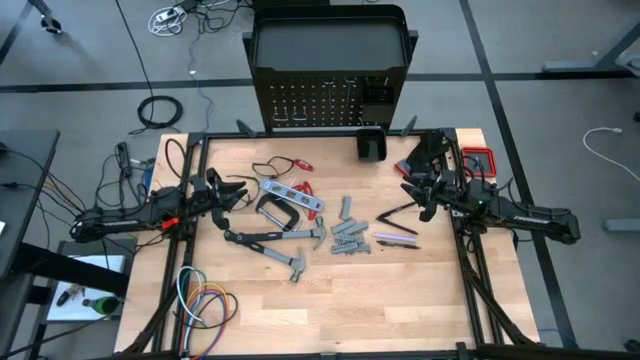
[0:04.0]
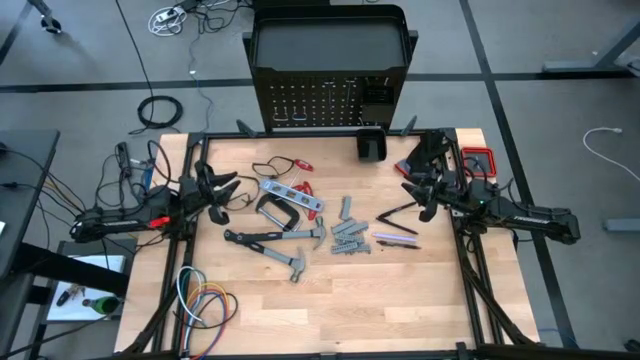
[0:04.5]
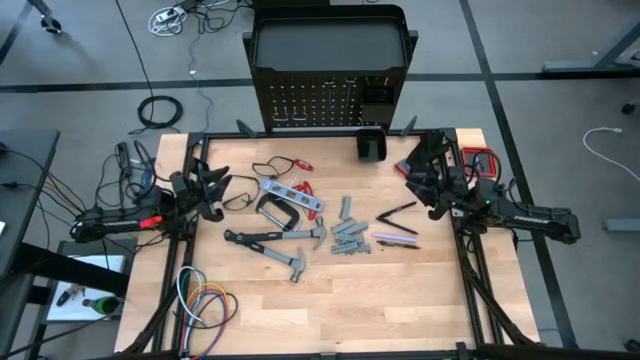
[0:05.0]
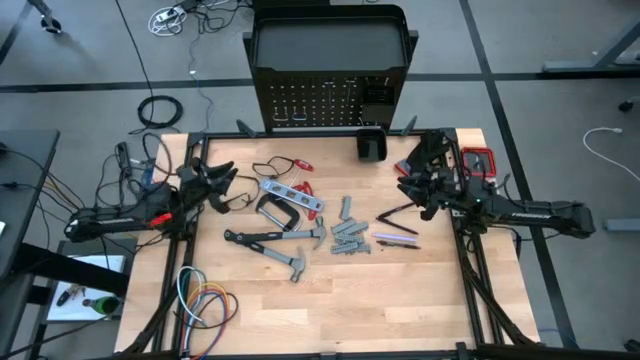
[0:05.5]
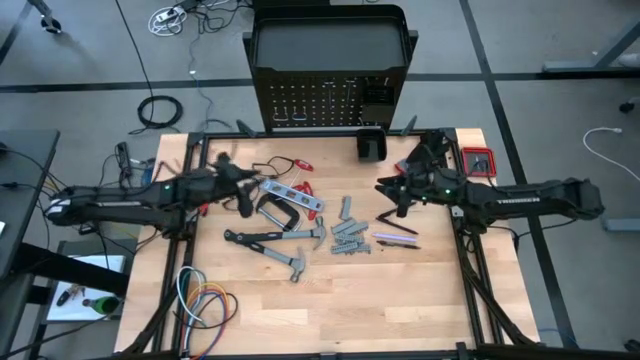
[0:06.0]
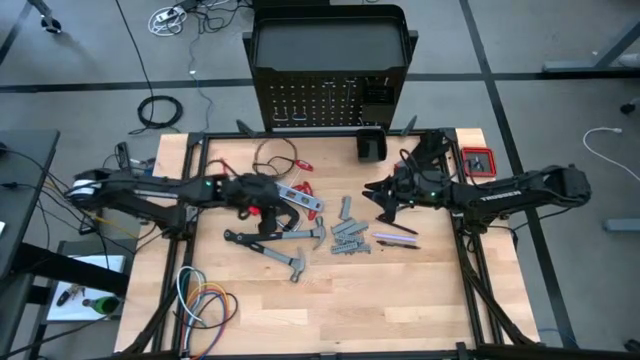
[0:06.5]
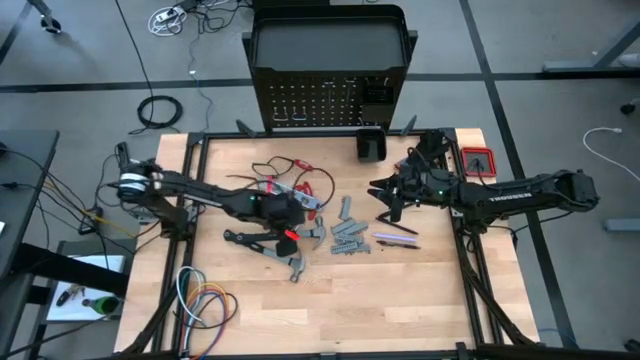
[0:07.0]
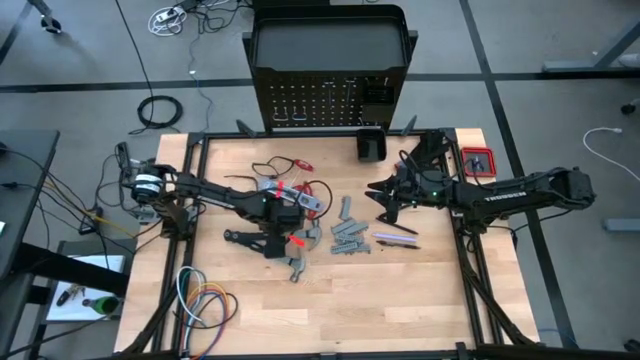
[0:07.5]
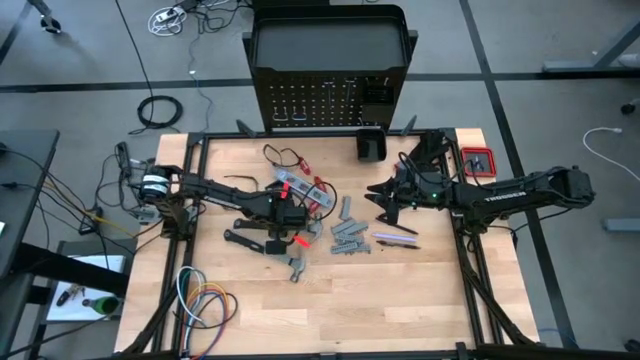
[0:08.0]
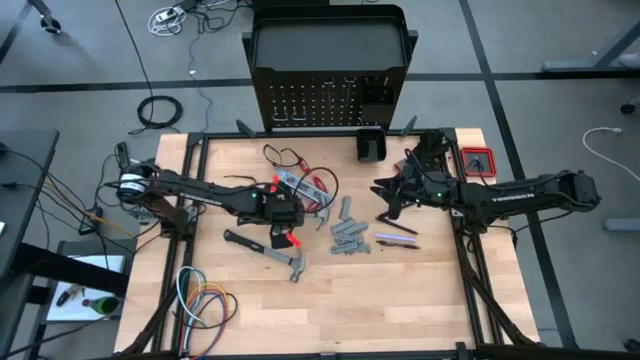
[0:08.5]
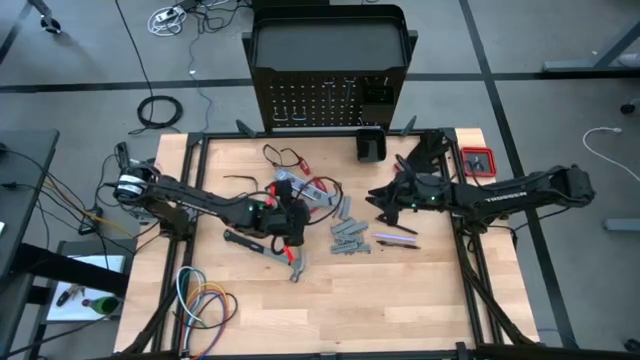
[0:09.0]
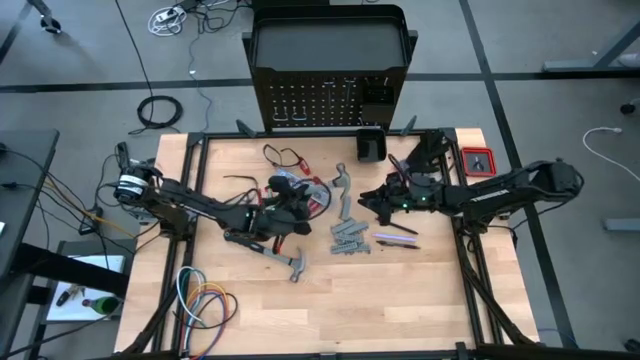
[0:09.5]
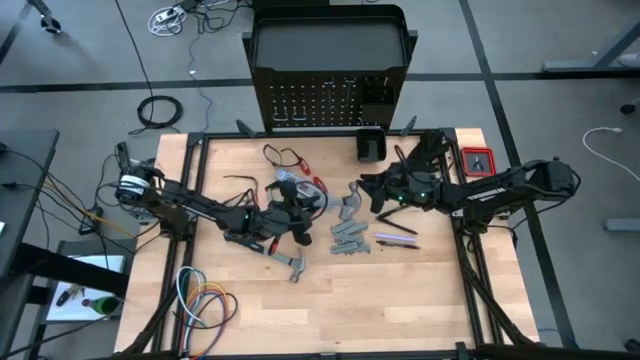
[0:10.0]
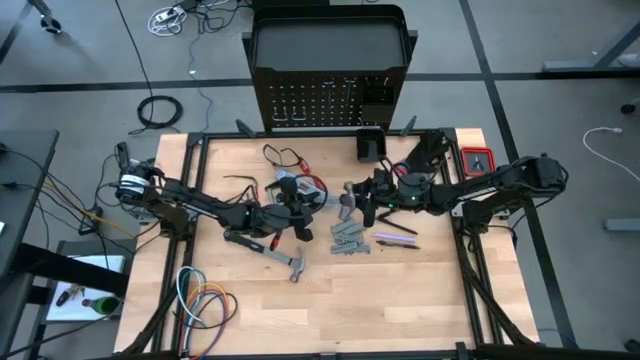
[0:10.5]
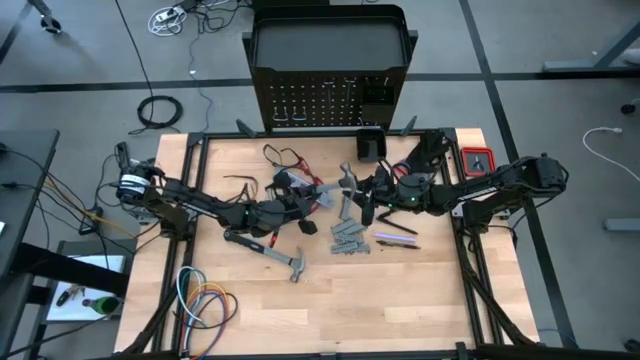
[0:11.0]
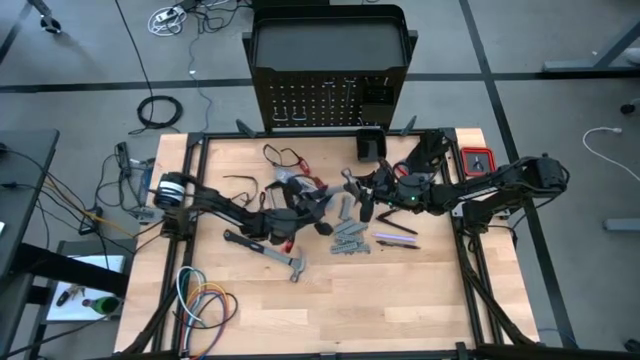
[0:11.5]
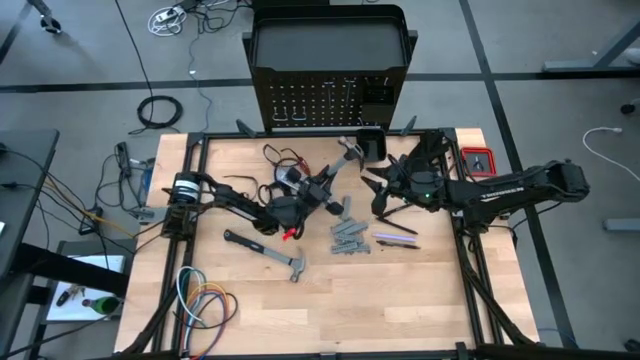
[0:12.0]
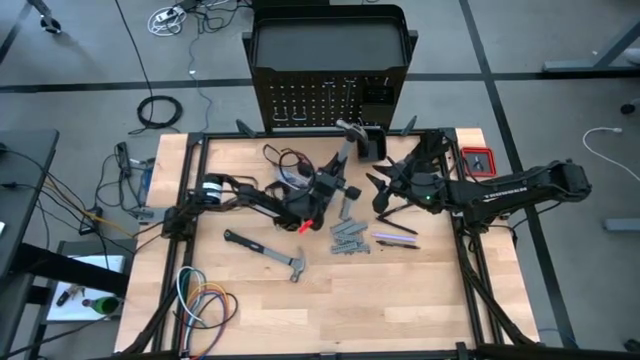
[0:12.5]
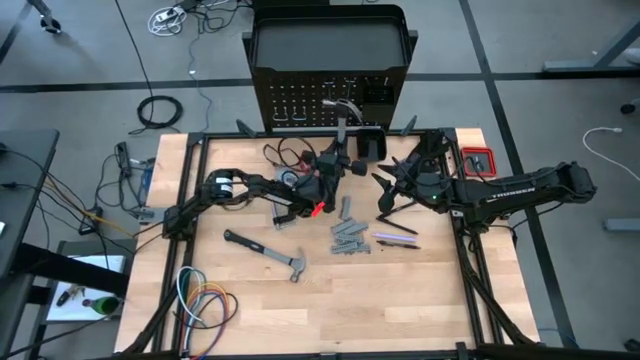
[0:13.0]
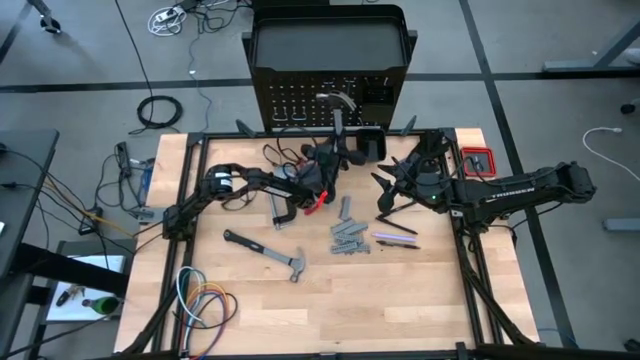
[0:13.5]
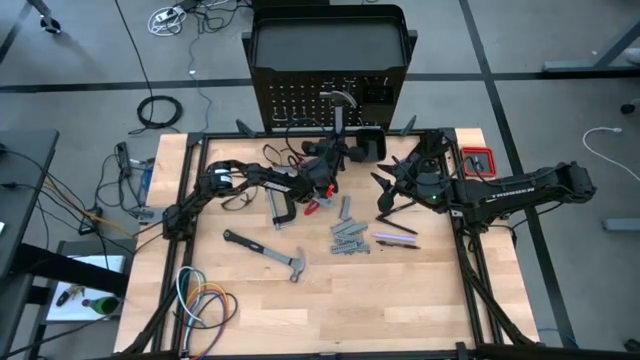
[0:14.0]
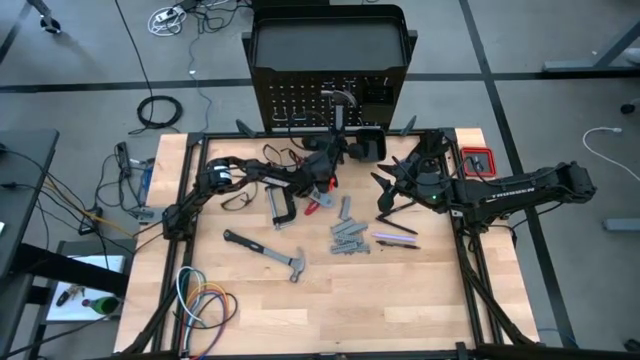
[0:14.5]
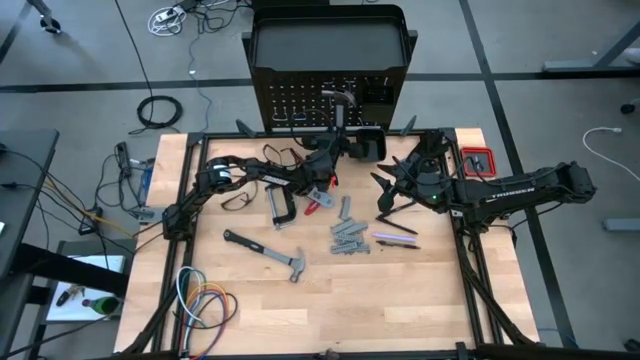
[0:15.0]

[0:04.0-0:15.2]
Task: Hang tools onto peg board
Hang the top hammer onto the peg board

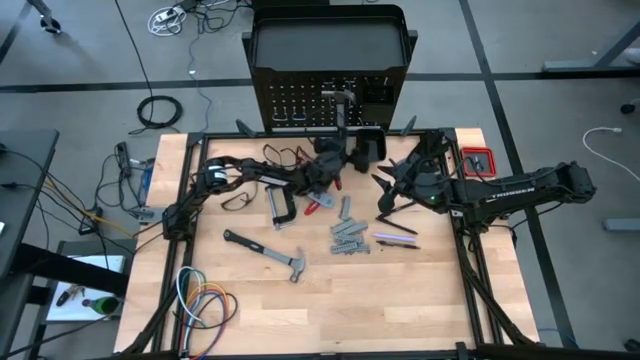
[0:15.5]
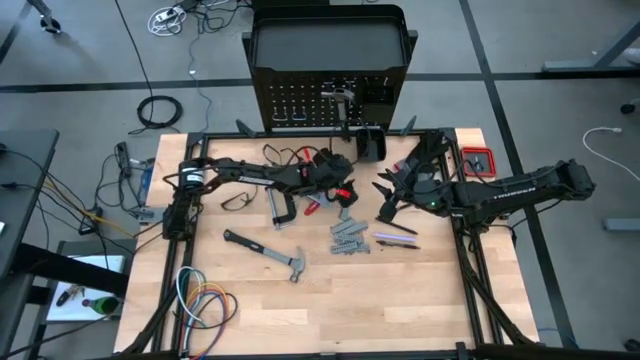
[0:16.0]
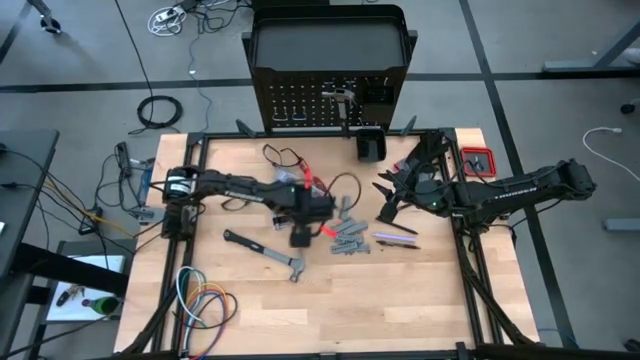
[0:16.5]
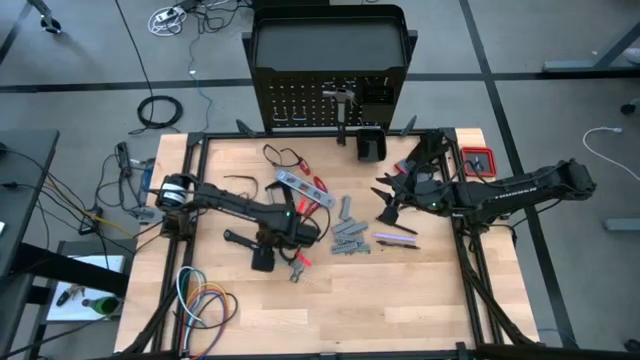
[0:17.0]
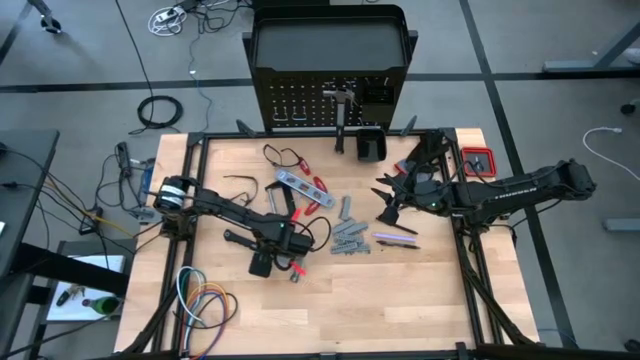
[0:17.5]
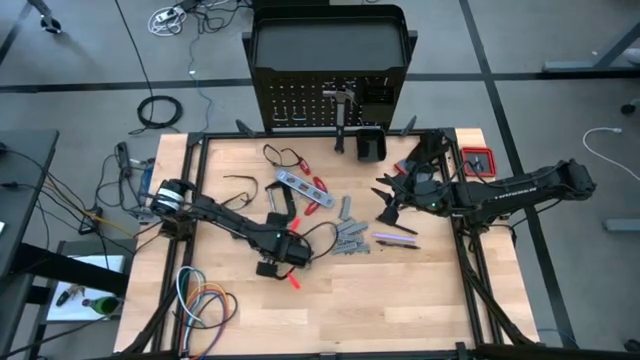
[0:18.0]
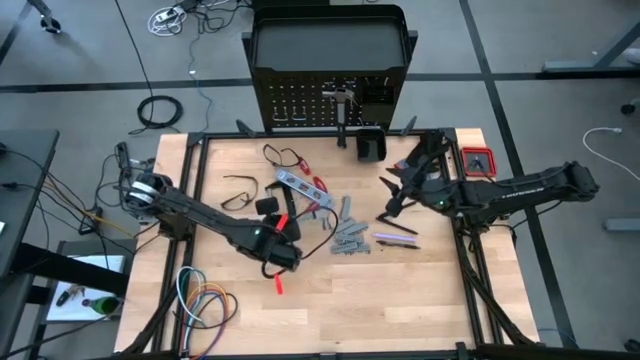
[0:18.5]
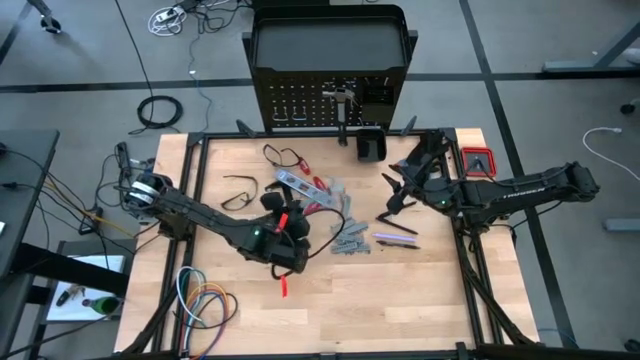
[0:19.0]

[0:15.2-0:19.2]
Hang the hammer onto the peg board

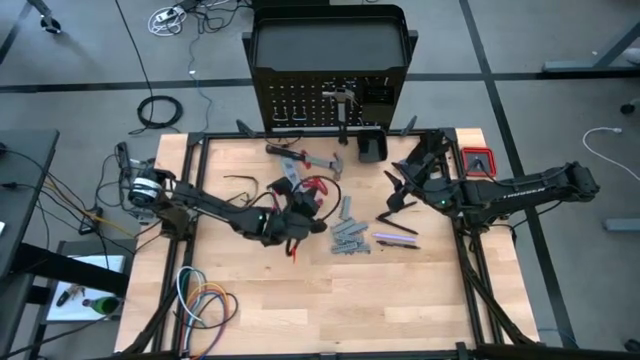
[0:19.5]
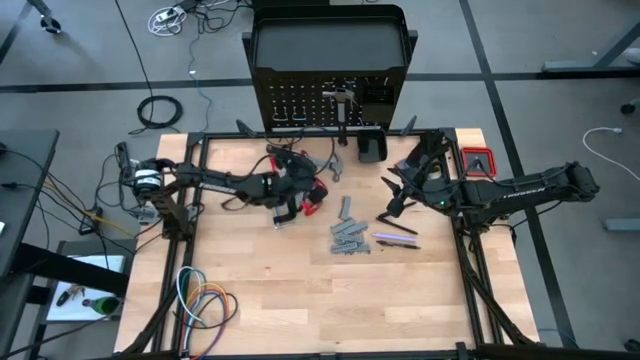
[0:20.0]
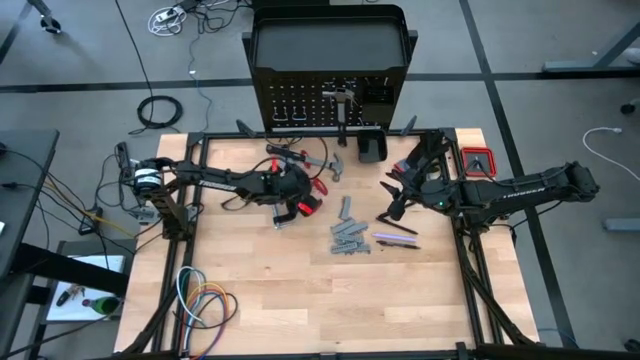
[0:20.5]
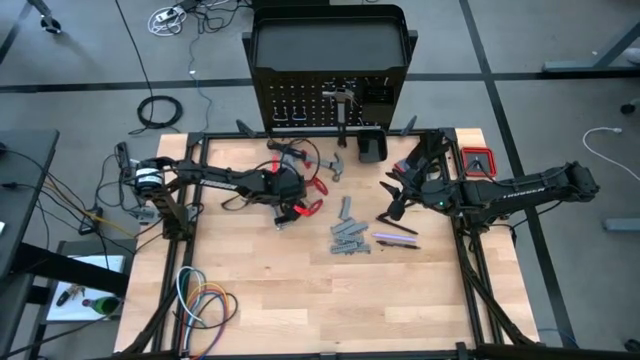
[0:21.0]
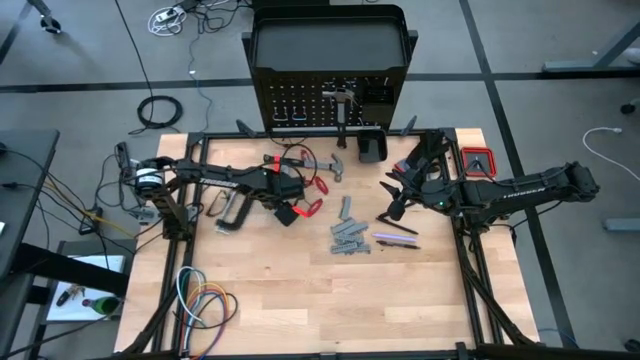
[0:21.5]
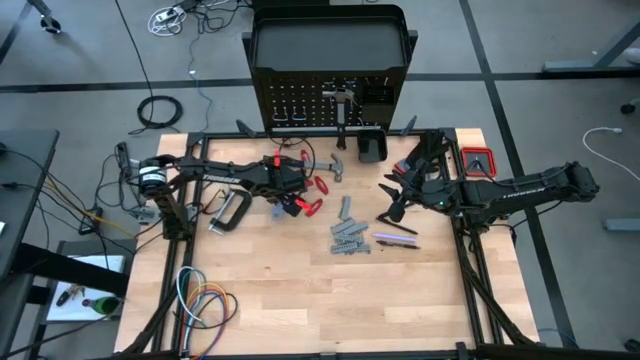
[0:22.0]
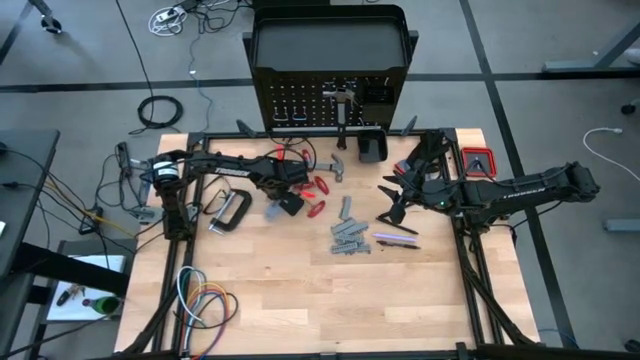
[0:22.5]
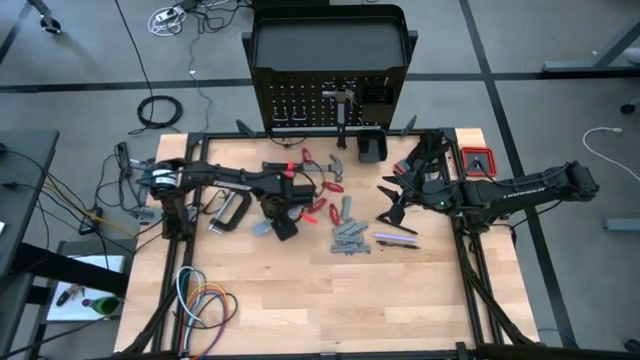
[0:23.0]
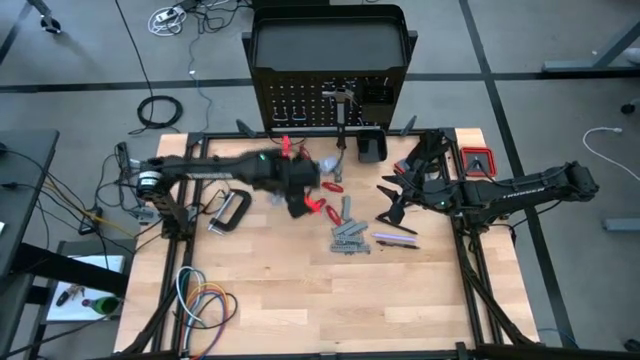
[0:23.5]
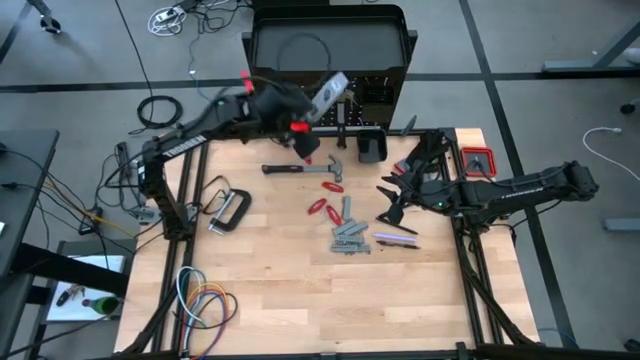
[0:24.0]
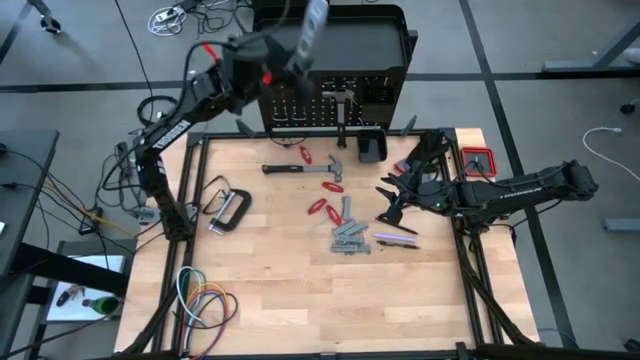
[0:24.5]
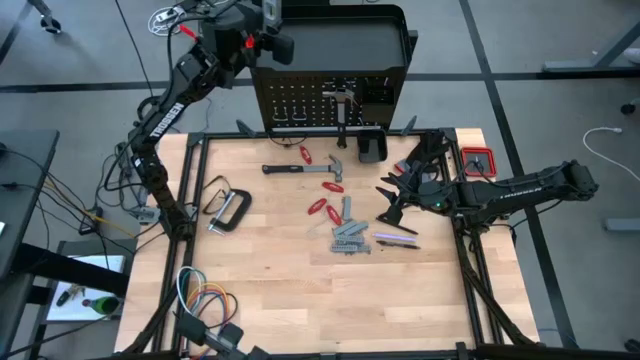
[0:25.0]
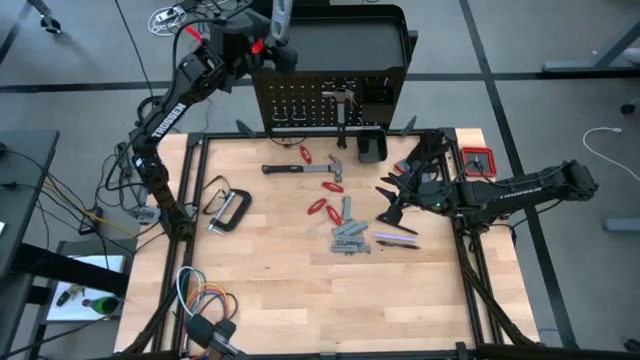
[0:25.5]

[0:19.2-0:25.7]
Put the spirit level on top of the peg board
